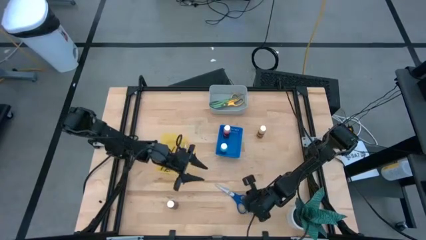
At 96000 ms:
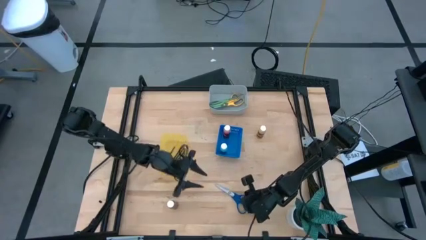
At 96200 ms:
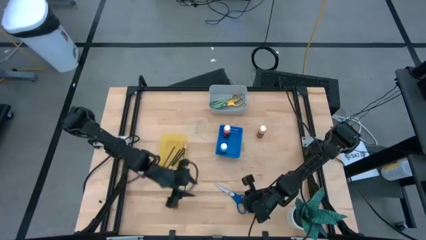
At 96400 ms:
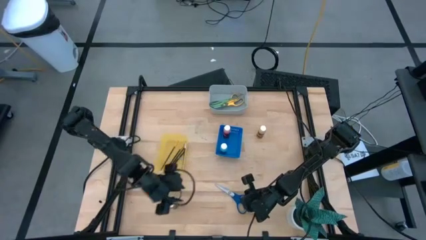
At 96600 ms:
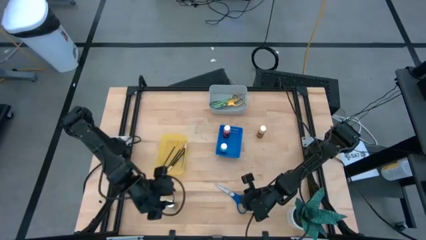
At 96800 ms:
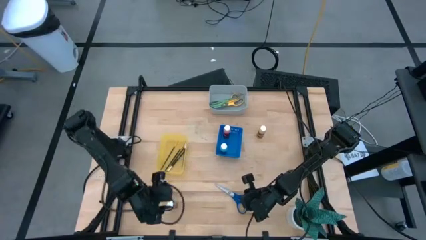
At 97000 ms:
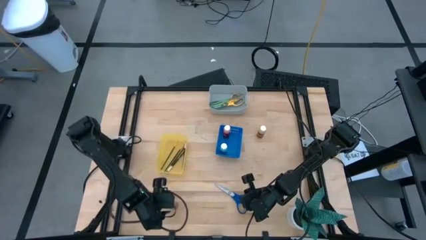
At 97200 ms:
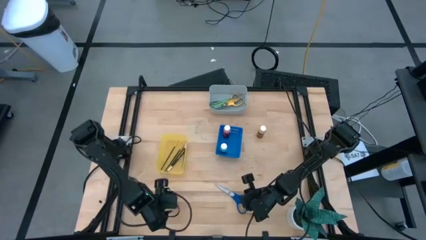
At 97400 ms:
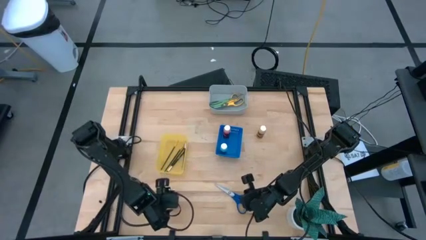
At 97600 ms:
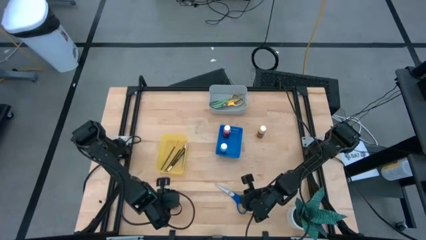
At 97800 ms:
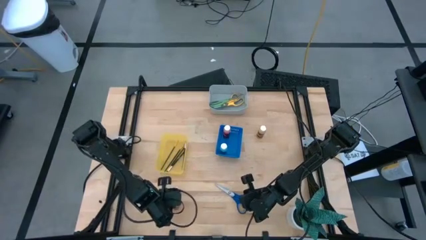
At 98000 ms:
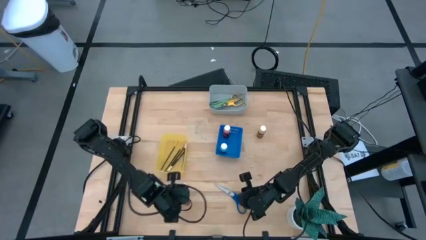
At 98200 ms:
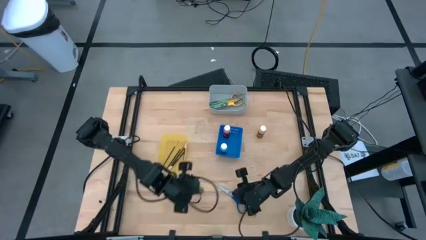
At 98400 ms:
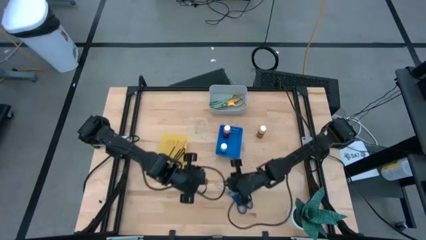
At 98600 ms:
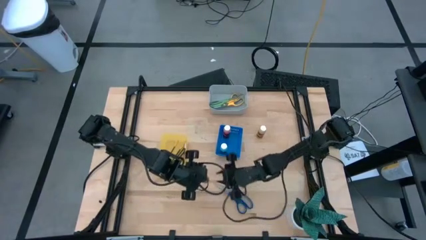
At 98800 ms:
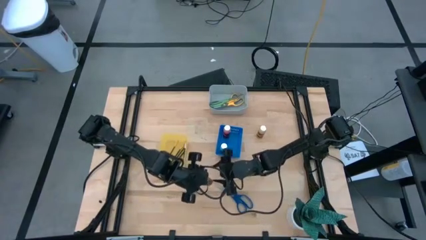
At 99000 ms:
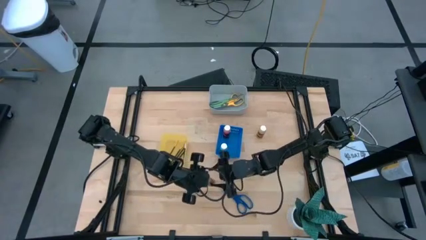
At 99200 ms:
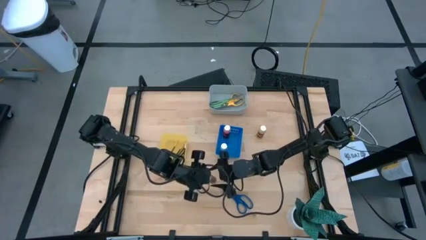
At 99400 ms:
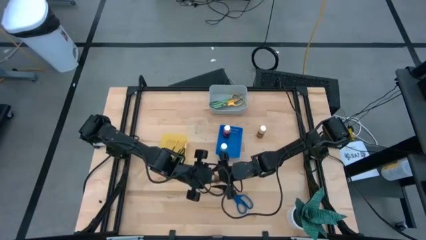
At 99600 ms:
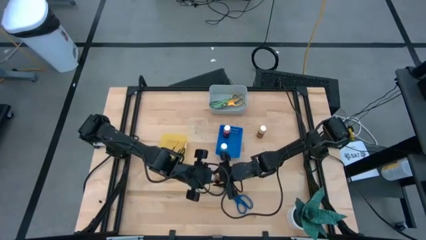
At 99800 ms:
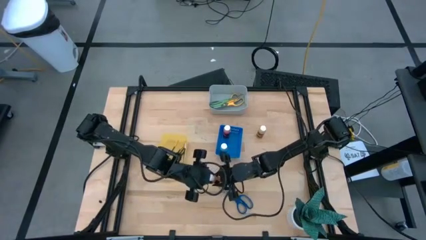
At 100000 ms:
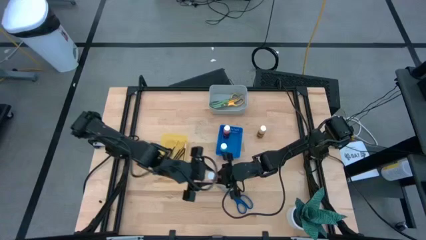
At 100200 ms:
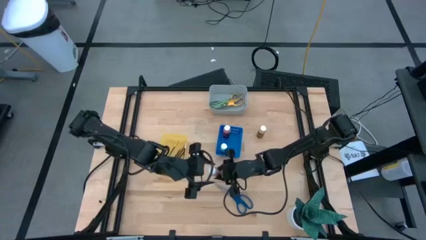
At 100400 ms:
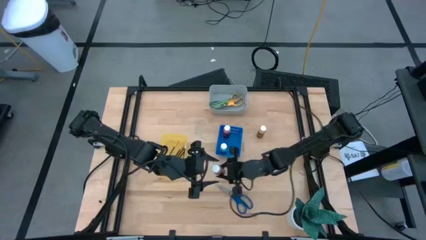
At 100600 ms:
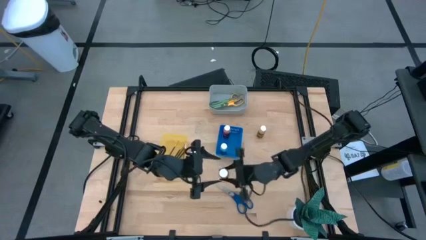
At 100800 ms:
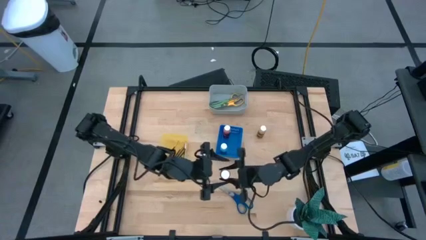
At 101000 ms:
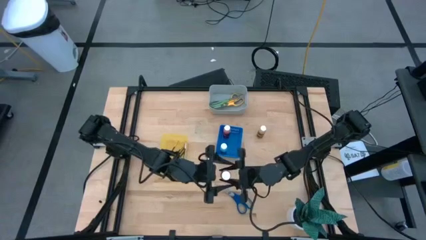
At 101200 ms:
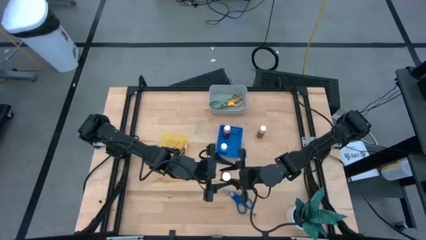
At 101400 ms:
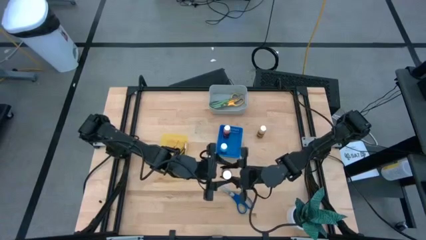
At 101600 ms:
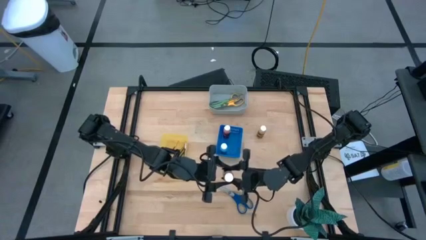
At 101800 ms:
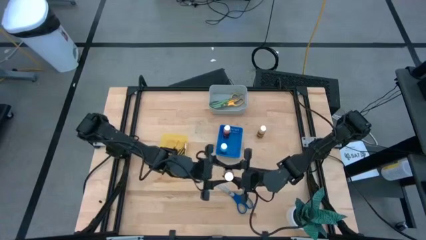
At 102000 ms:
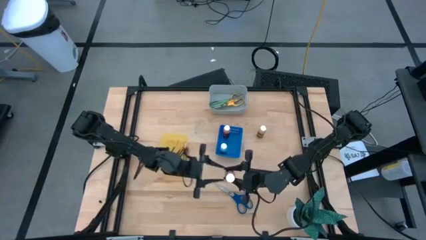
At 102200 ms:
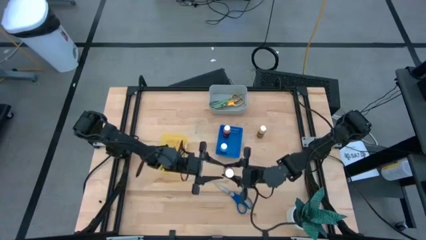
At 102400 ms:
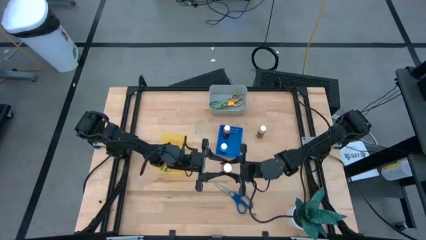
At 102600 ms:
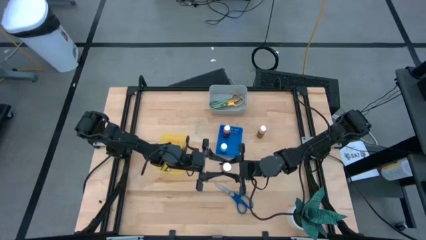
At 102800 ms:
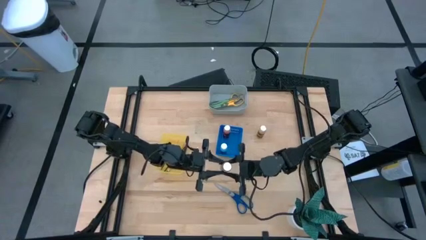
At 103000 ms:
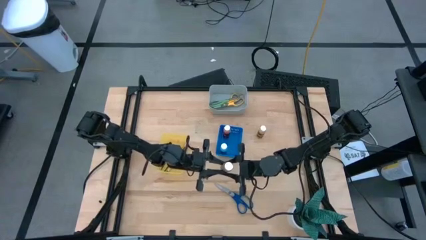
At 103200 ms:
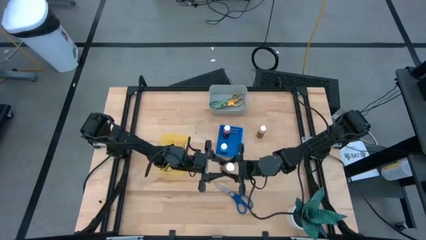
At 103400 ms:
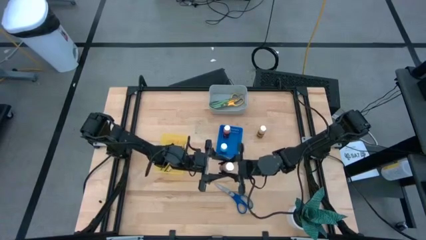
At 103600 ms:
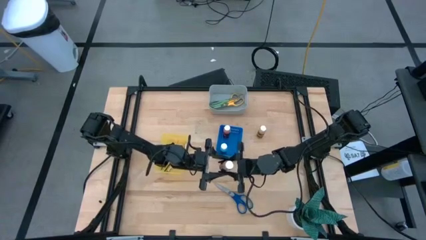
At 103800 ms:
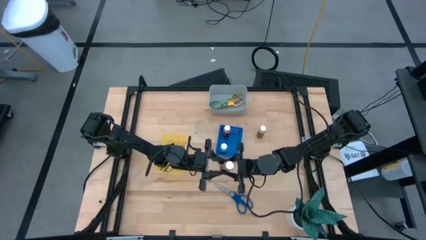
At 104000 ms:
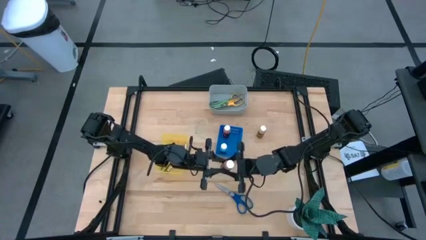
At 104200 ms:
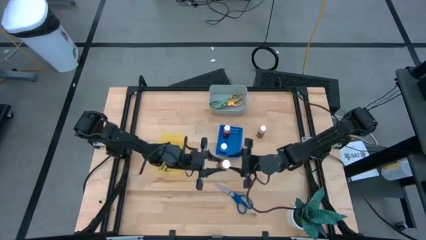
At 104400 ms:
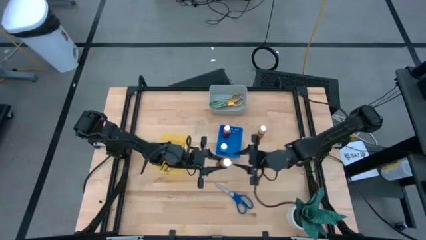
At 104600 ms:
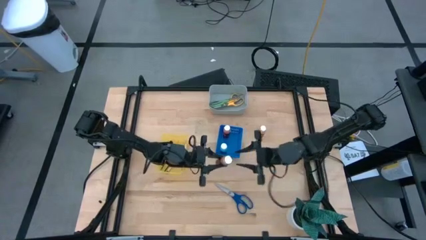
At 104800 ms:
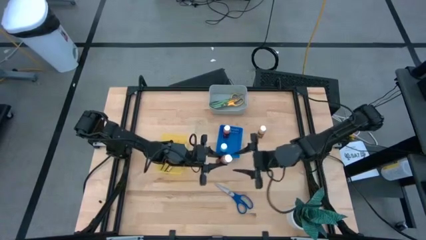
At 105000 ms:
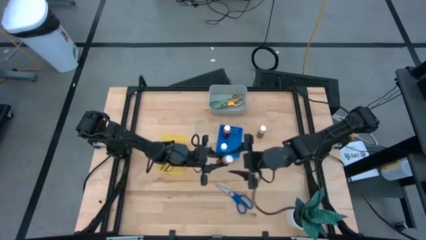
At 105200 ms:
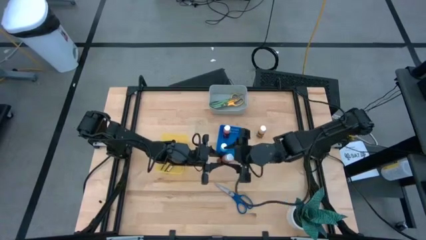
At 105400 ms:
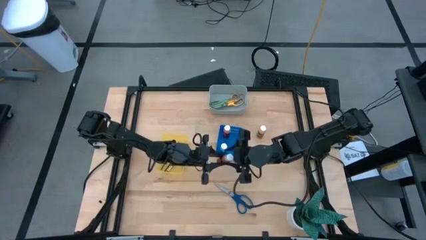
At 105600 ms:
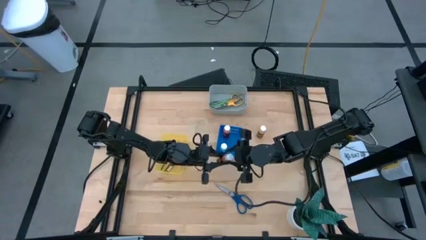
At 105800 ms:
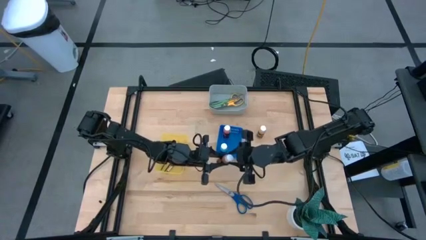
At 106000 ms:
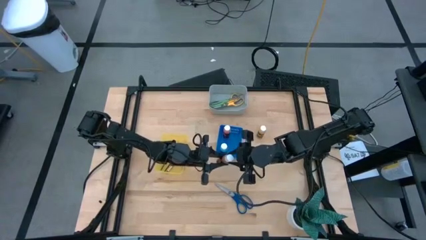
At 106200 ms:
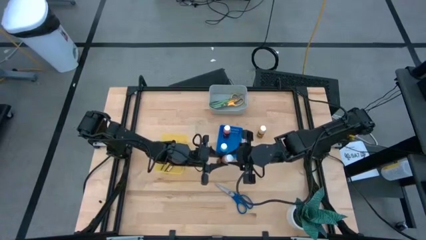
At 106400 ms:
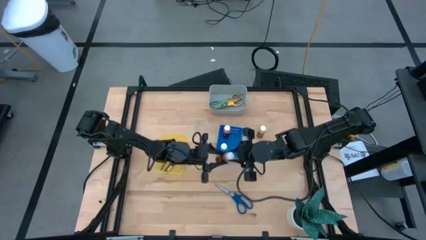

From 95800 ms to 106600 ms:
Task: Pick & Place Paint Supplies
Put the orange paint bottle into the blue bin

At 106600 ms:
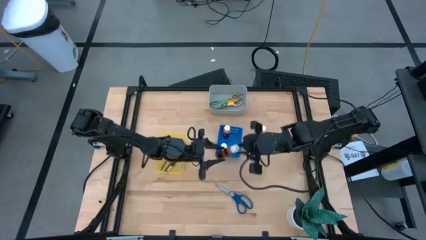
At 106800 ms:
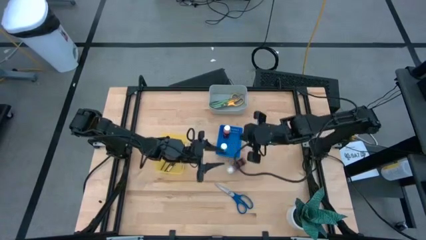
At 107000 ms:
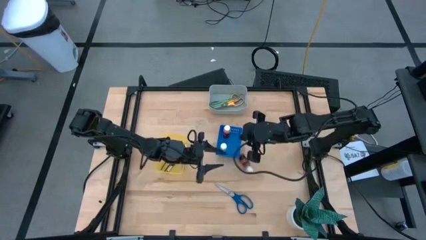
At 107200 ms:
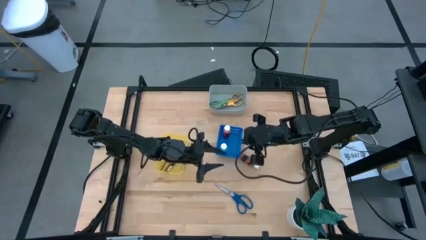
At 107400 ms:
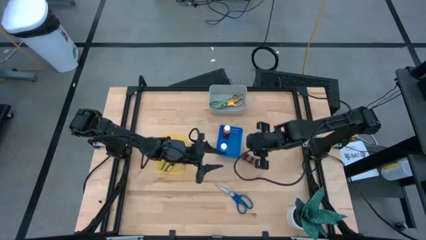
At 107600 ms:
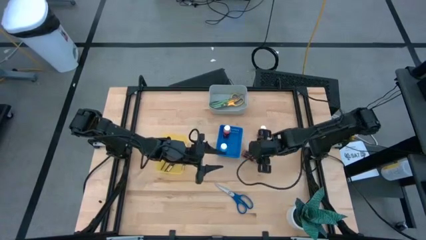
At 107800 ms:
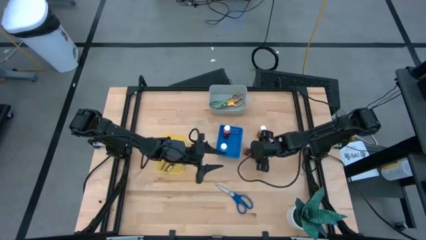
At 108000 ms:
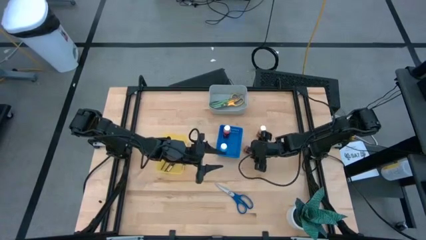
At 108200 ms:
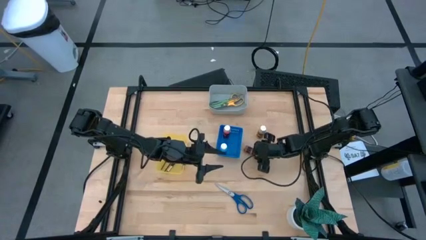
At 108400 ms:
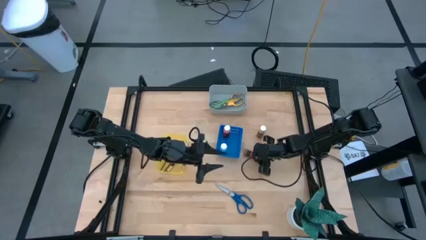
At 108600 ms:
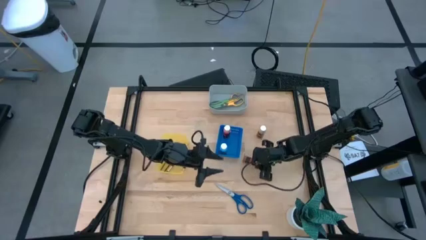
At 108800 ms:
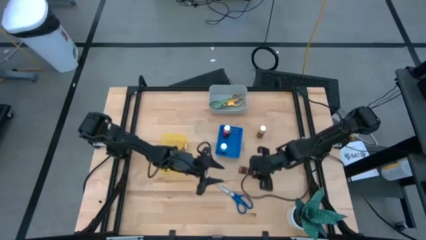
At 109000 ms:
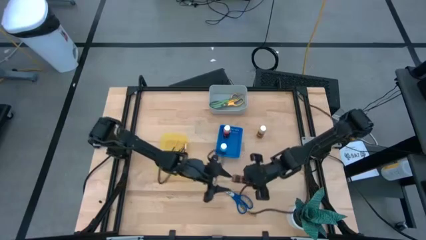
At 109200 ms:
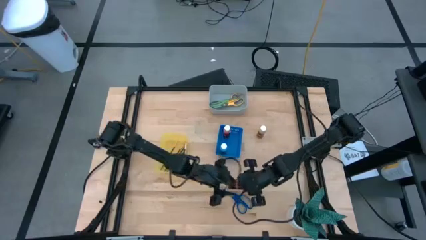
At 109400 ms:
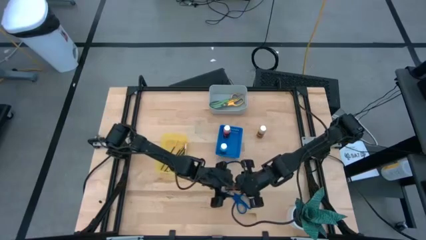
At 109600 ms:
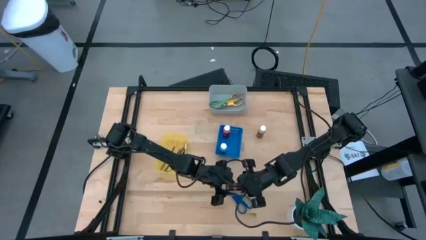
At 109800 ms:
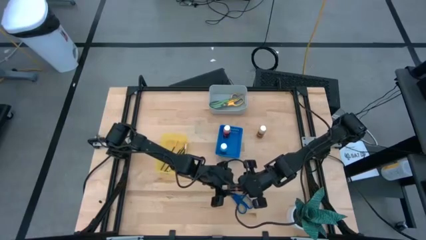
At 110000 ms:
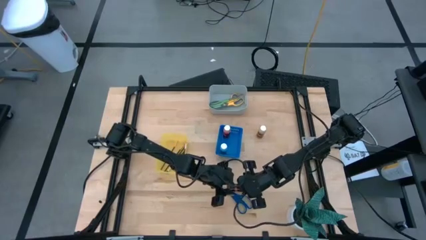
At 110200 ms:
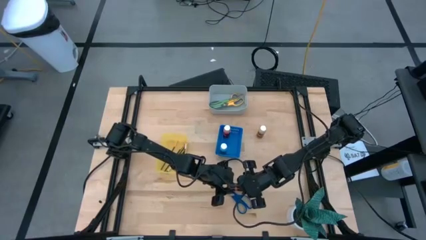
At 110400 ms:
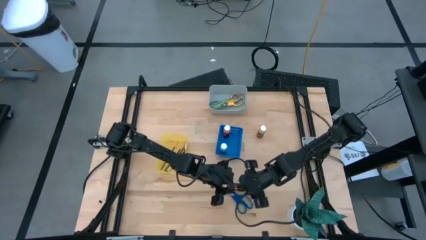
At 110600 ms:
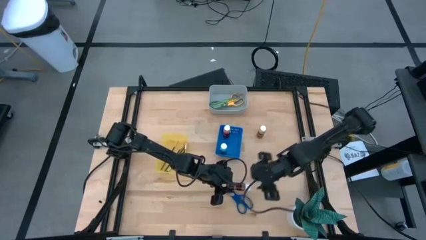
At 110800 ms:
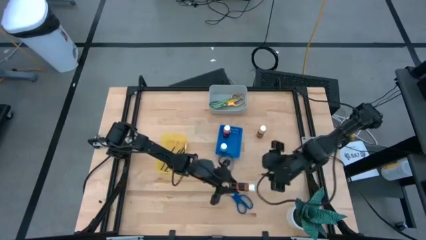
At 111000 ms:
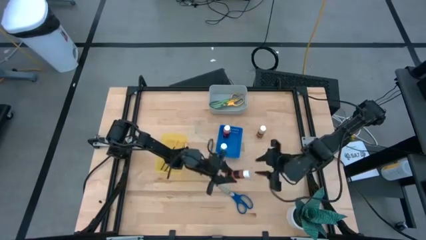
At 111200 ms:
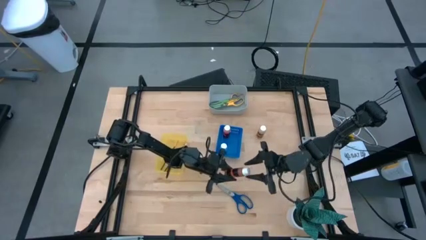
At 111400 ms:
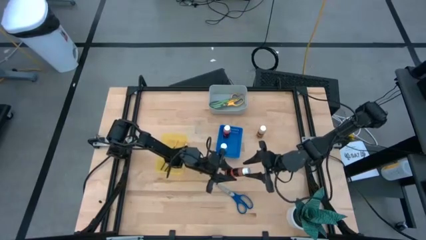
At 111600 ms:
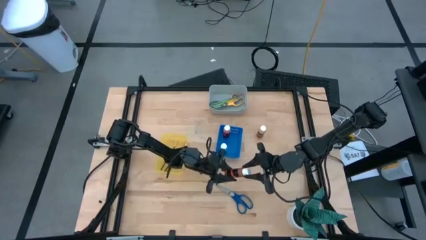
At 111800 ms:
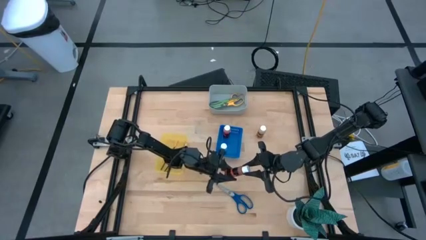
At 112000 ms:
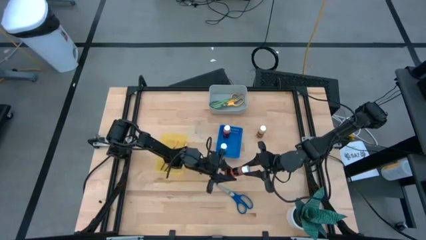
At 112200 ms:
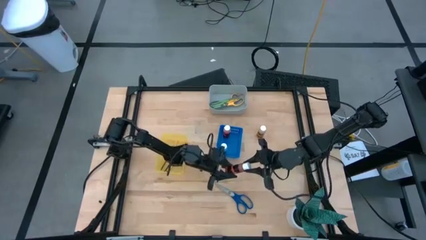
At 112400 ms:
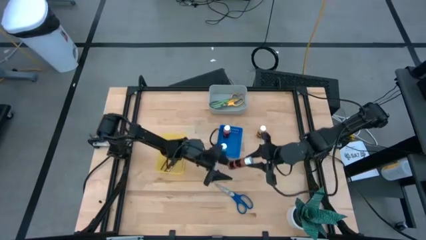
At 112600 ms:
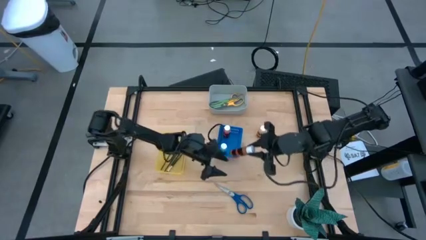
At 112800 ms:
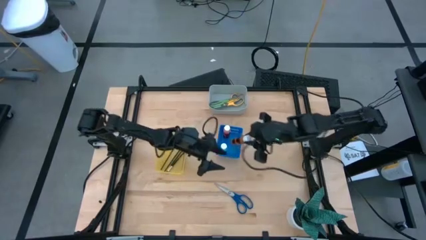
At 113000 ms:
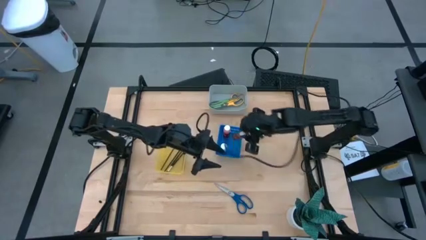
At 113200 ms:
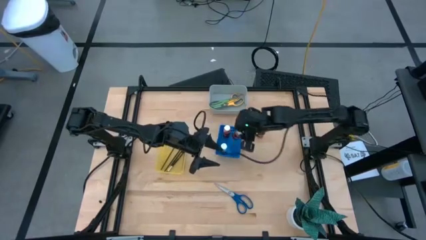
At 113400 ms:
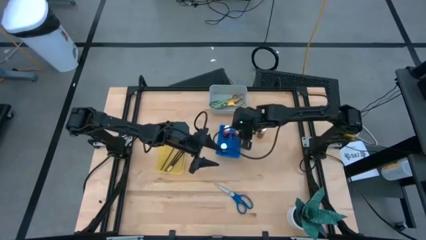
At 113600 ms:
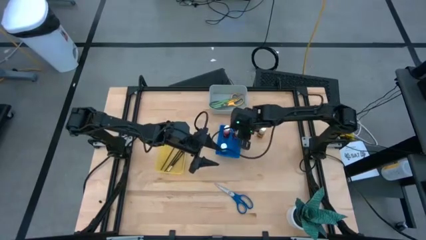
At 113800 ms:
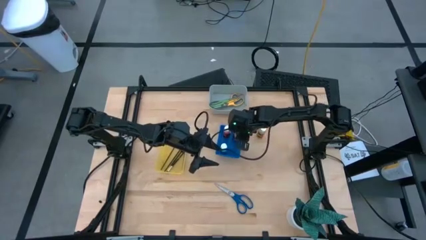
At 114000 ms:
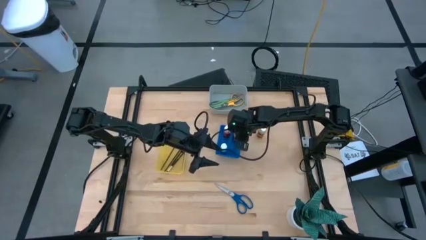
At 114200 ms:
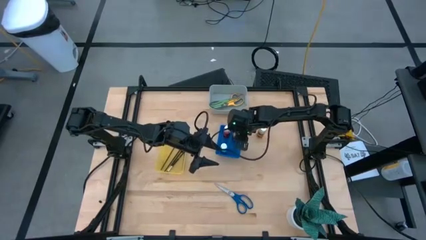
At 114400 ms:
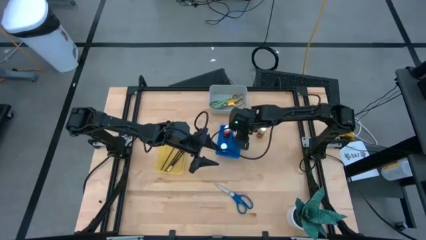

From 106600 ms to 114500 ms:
Put the orange paint bottle into the blue bin
